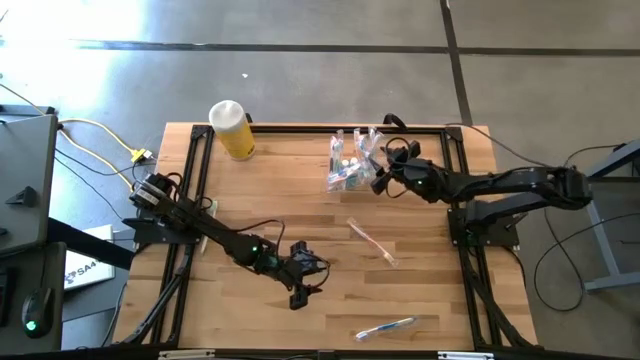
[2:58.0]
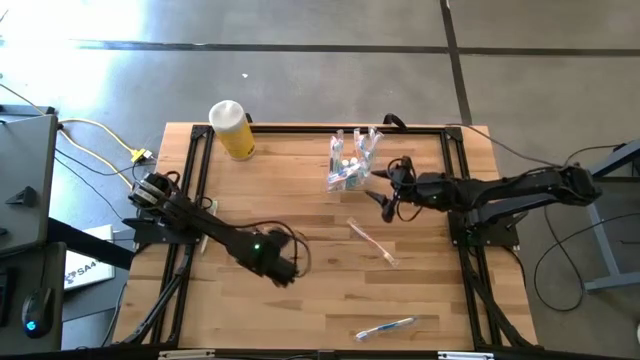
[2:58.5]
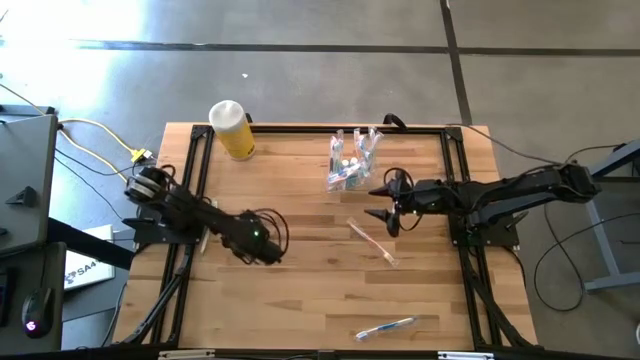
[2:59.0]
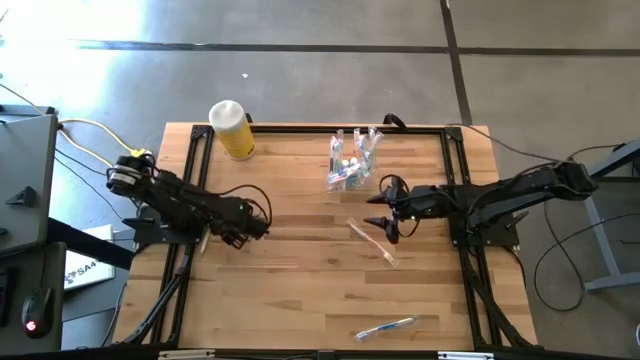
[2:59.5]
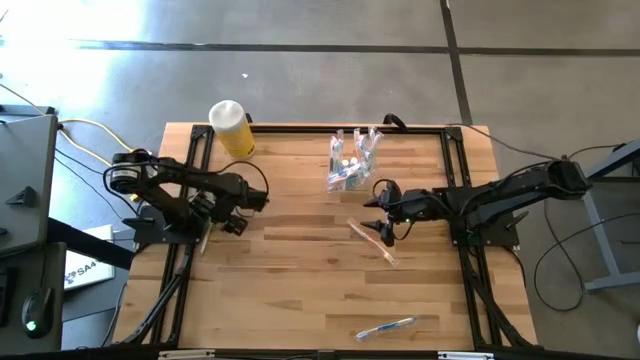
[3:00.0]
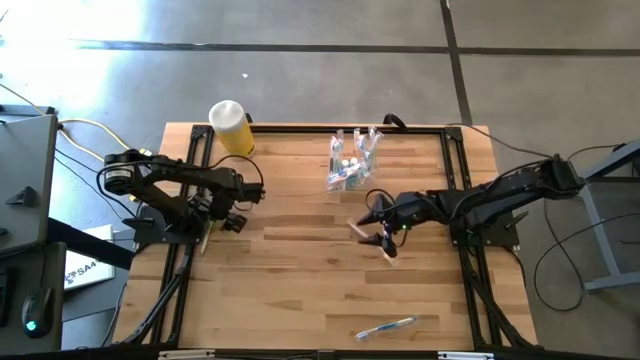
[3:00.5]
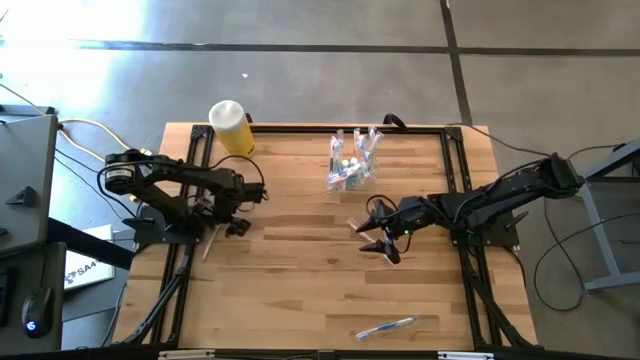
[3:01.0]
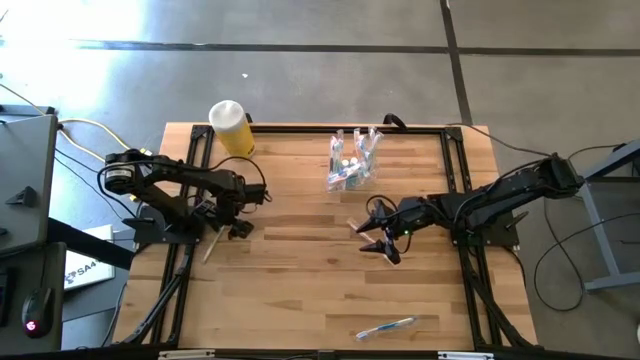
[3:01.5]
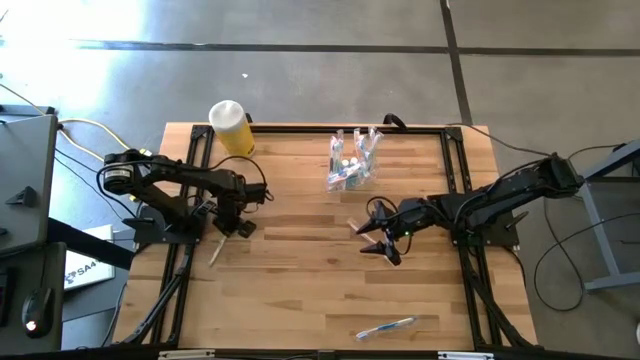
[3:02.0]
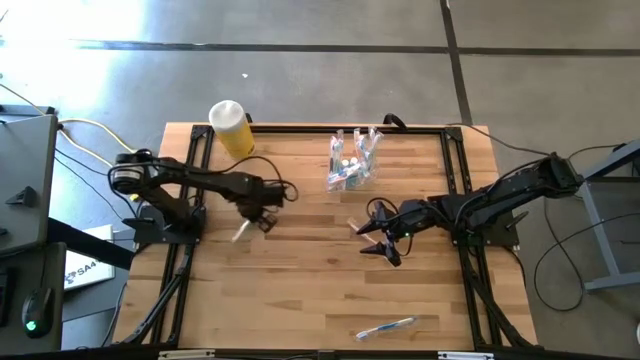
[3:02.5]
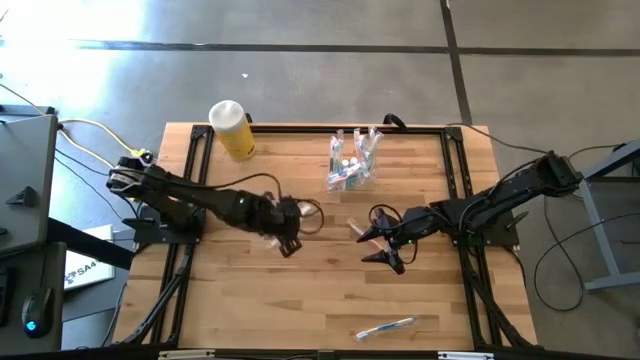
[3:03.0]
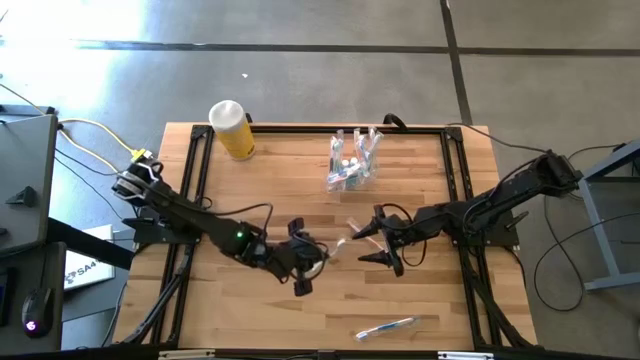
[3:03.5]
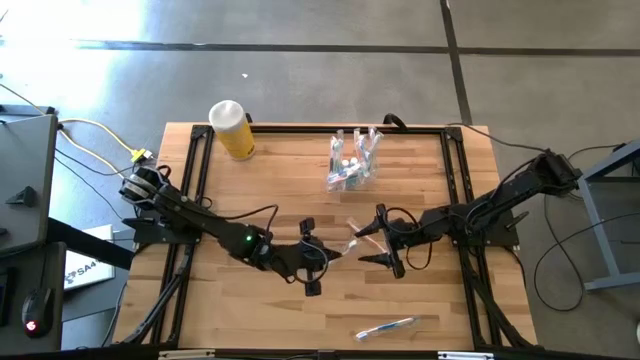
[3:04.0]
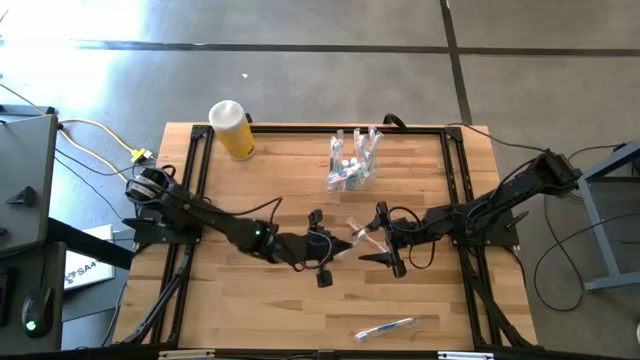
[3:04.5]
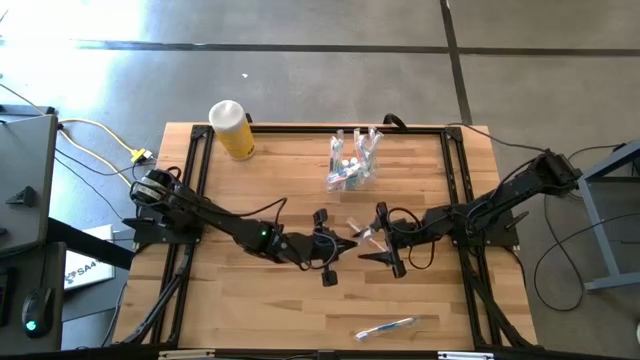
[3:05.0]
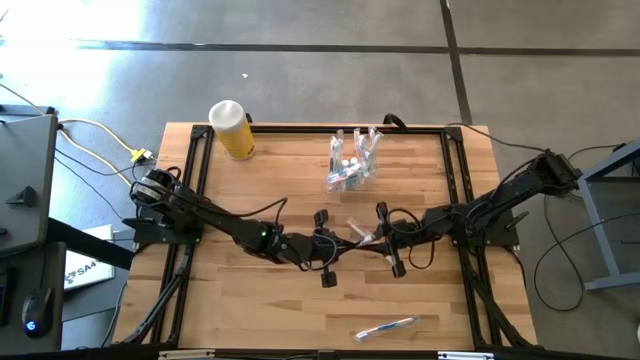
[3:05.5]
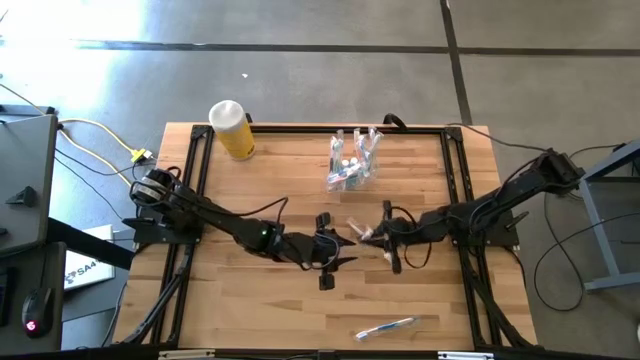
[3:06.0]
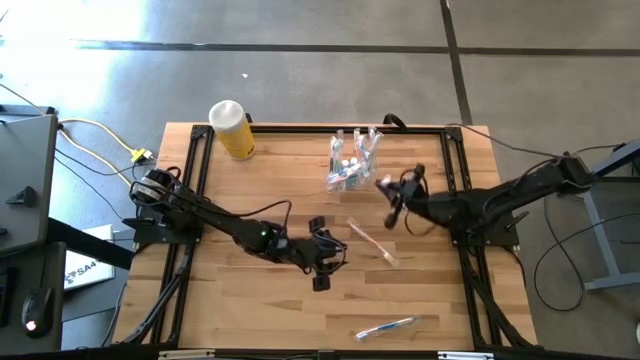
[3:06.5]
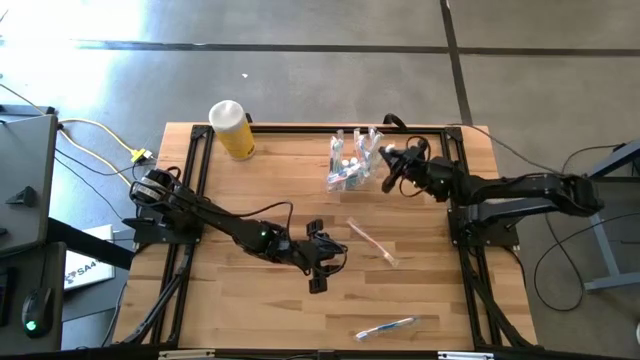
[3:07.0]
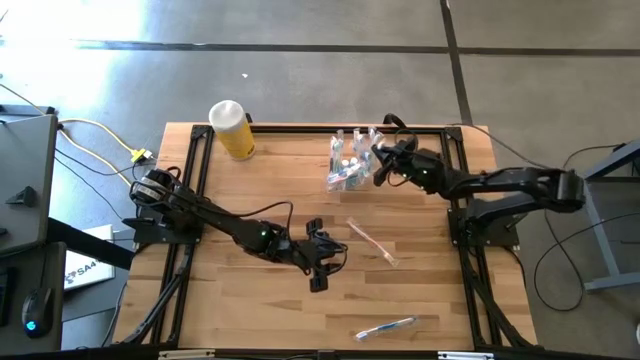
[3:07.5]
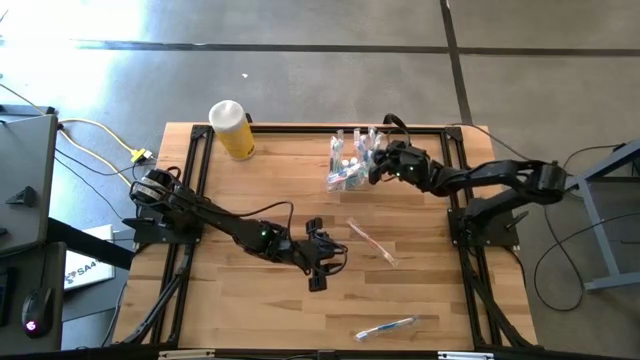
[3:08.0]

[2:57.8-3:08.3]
Task: Pick & Place toothbrushing station
Put the green toothbrush into the transparent organizer

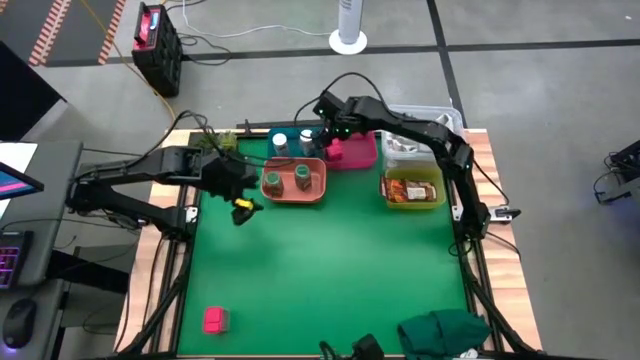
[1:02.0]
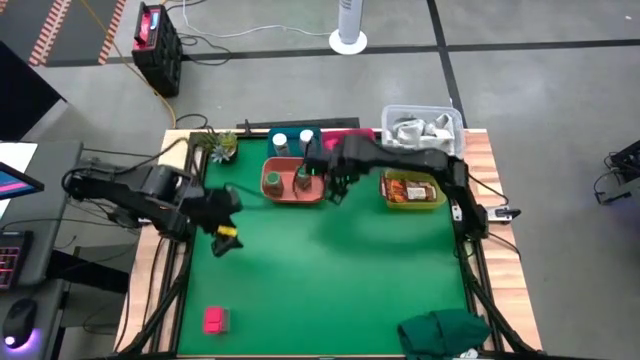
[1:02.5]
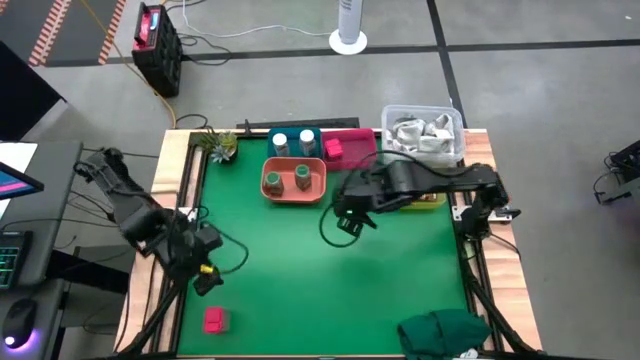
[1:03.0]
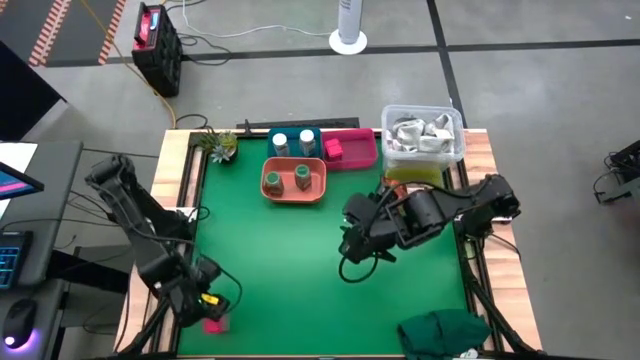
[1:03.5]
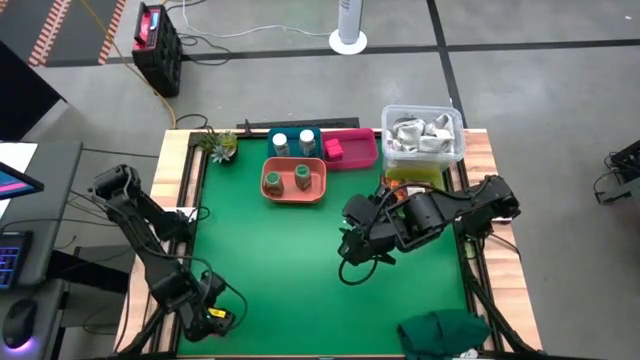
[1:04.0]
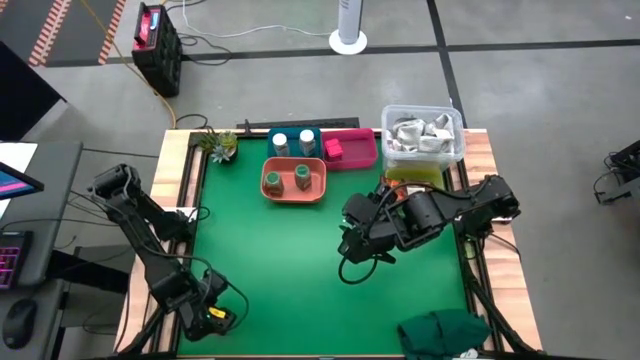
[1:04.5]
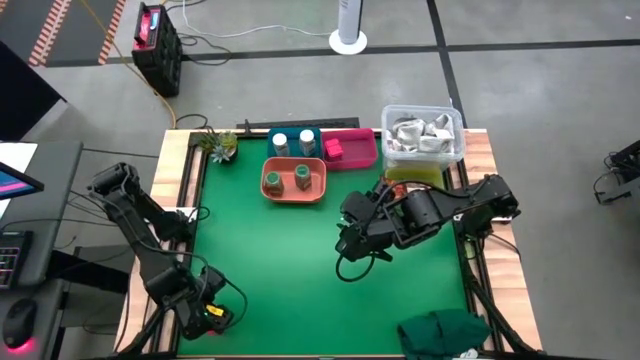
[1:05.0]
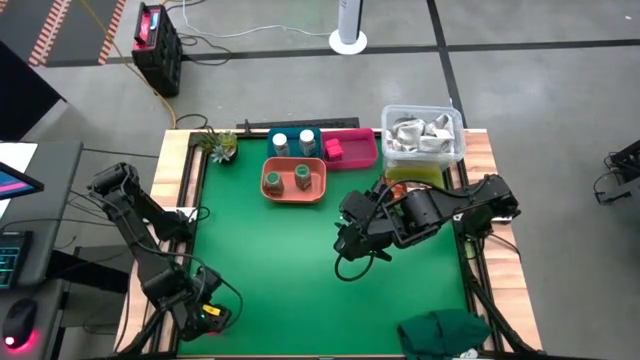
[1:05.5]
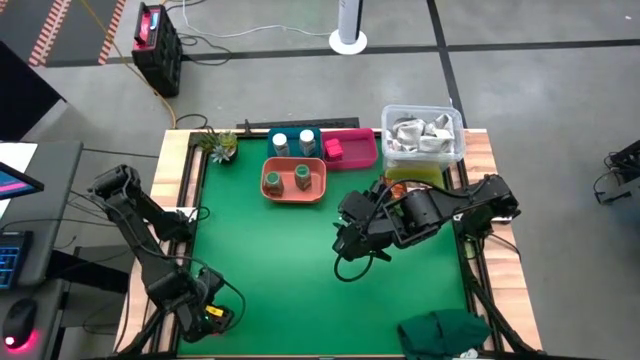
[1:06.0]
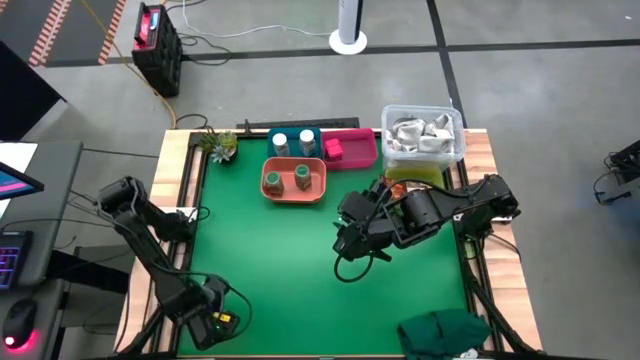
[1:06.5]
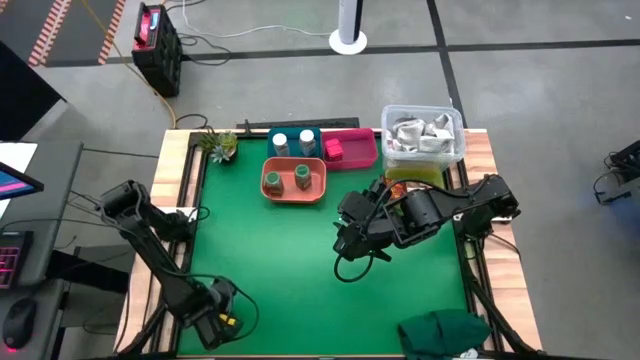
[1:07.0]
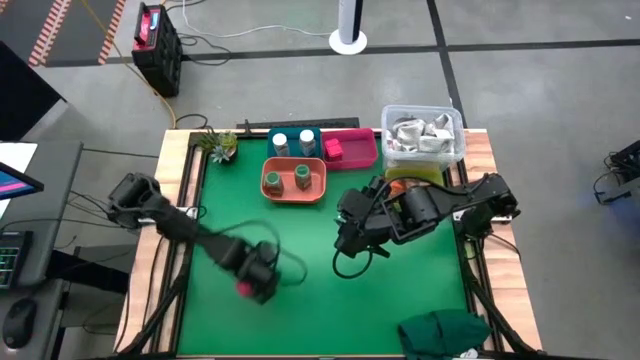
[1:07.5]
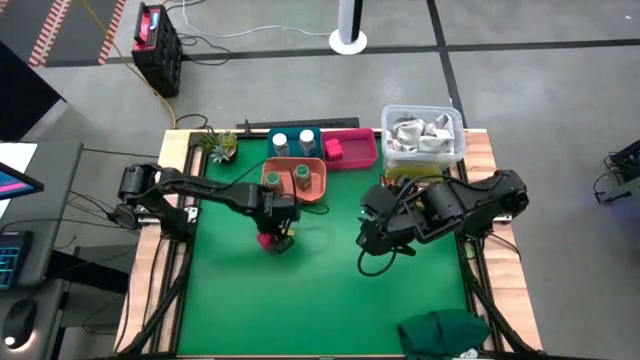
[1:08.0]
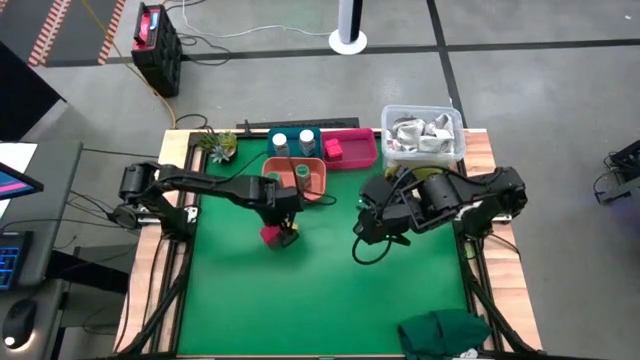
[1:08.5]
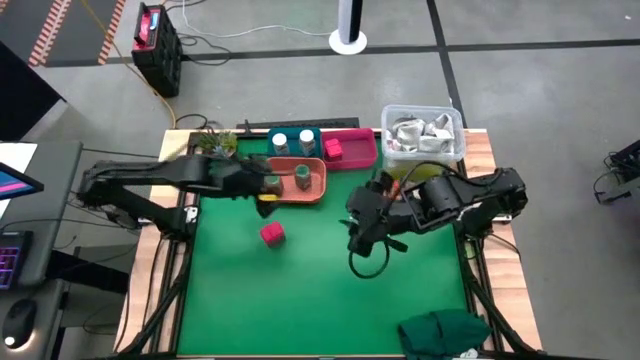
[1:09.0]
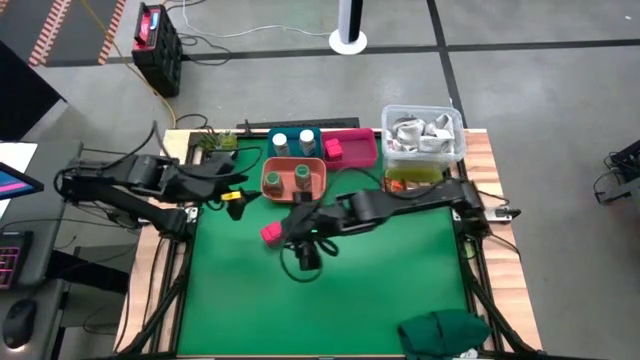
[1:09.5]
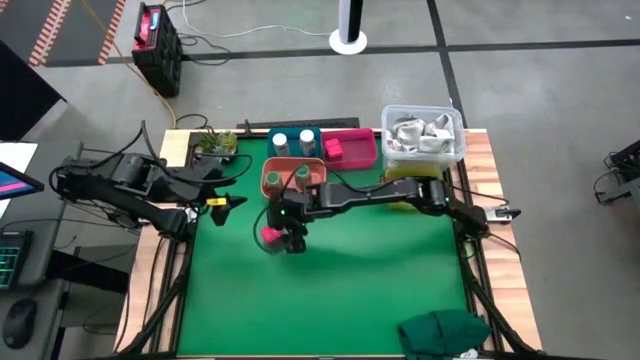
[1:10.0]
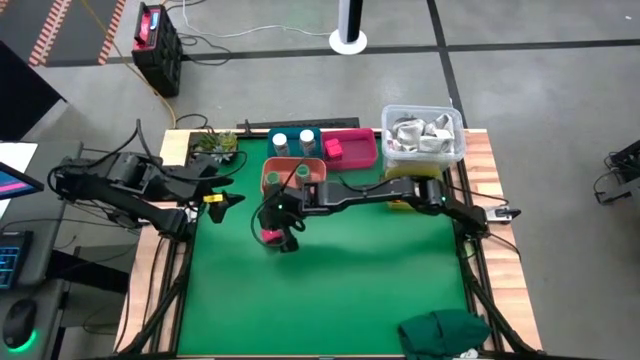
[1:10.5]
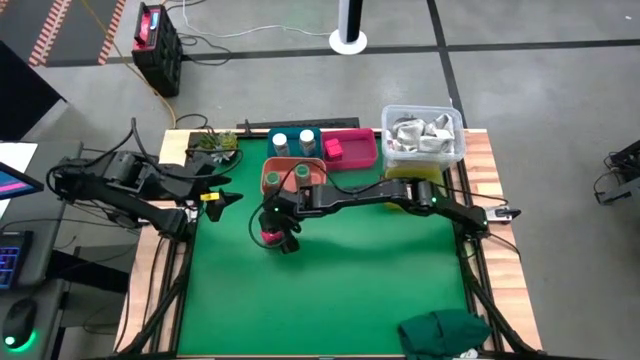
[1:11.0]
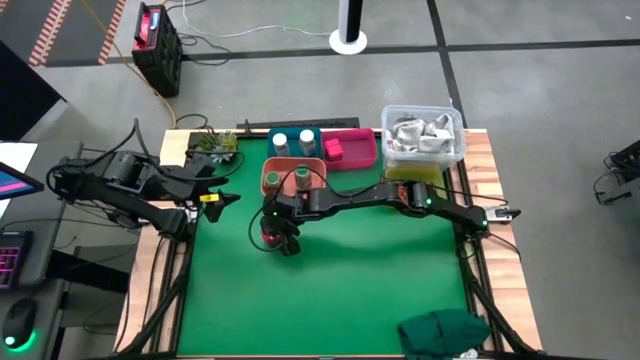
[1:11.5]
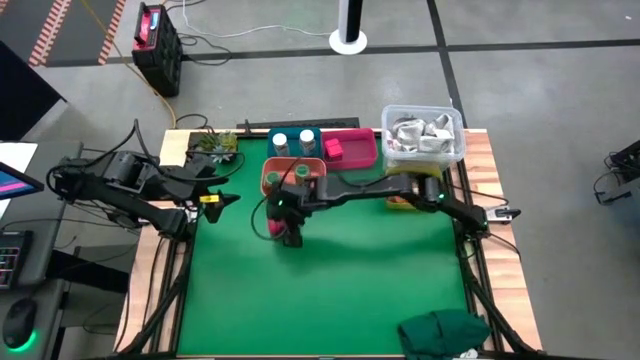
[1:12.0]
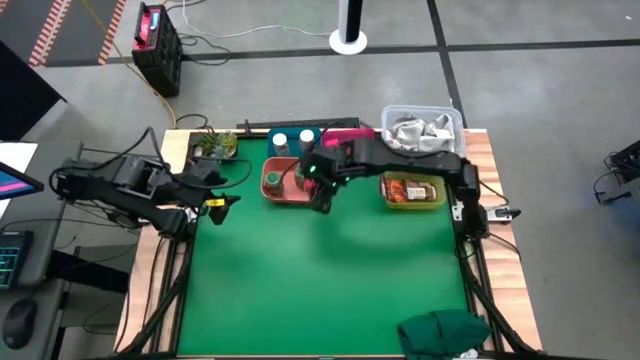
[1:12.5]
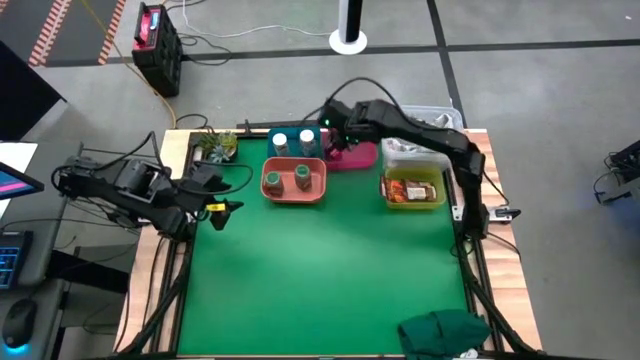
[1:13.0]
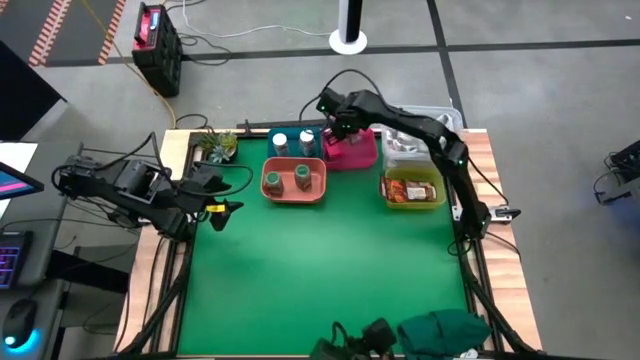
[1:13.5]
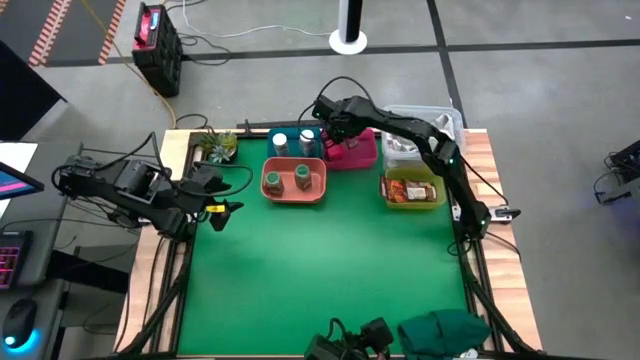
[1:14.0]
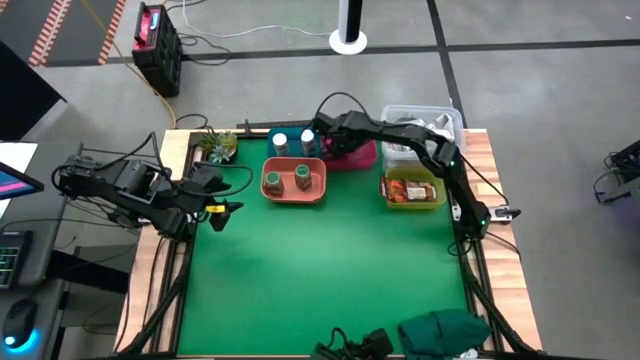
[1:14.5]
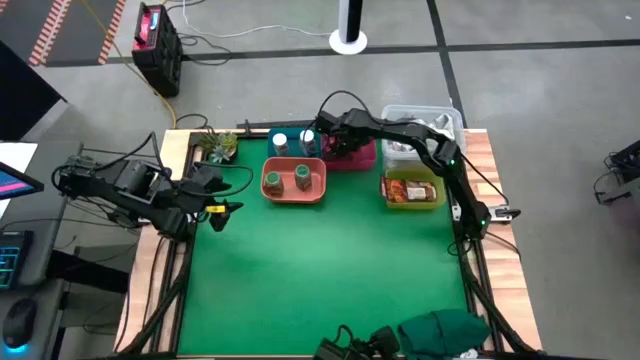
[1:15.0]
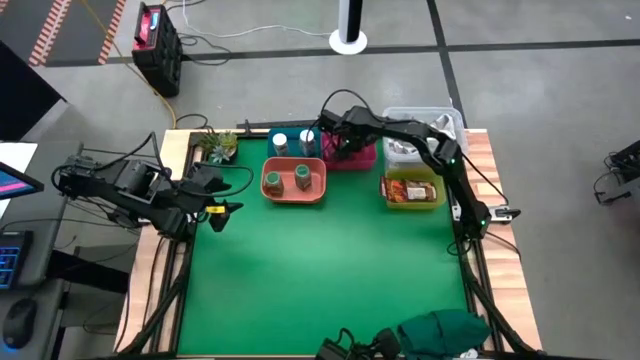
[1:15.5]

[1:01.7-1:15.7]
Task: Sort spices by type
Put the red seasoning can into the pink bin
